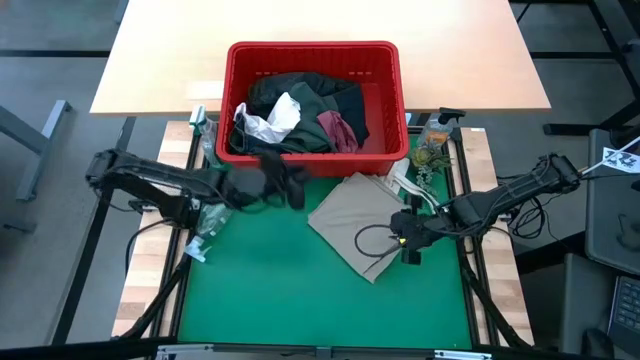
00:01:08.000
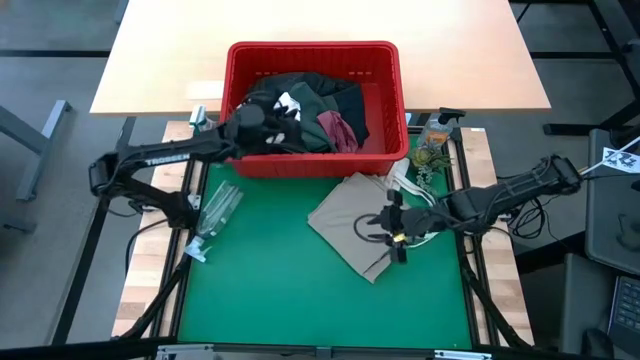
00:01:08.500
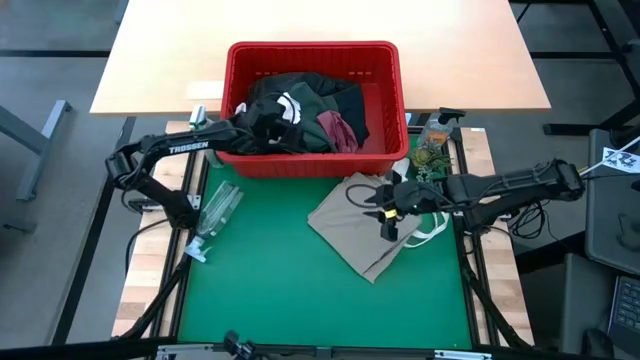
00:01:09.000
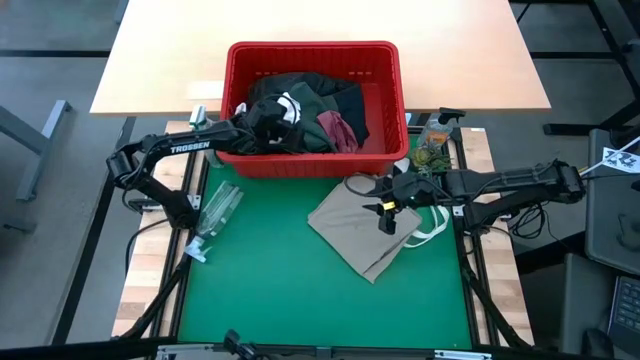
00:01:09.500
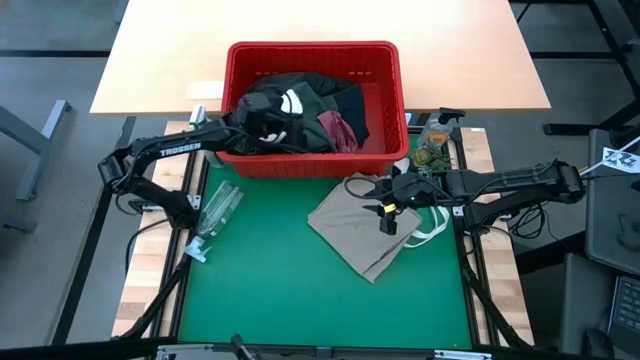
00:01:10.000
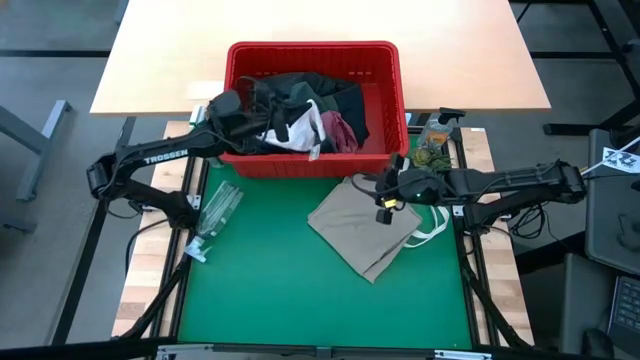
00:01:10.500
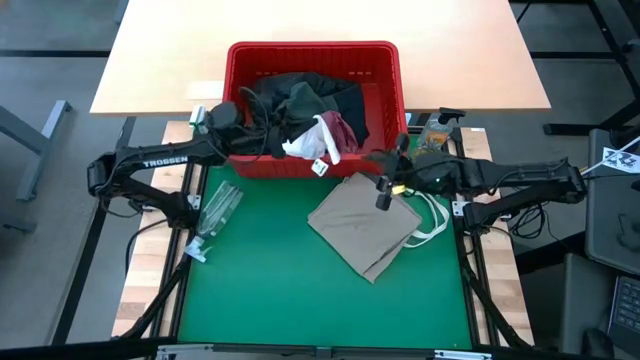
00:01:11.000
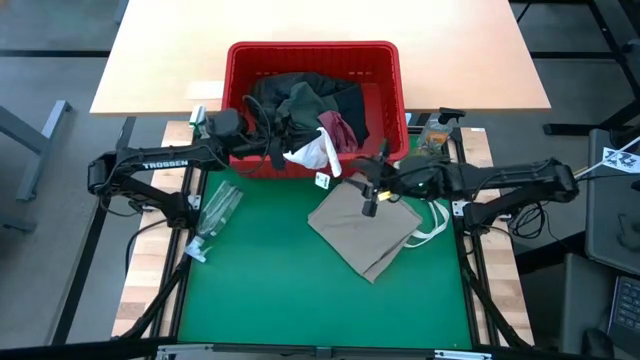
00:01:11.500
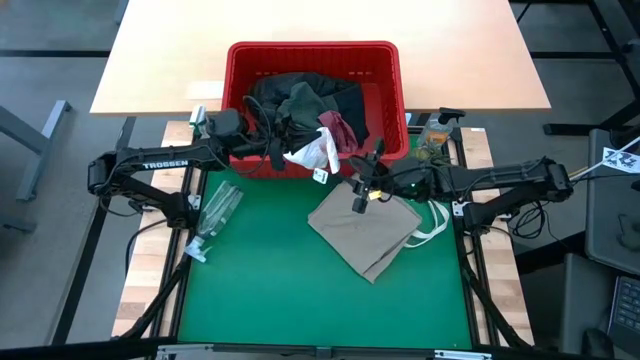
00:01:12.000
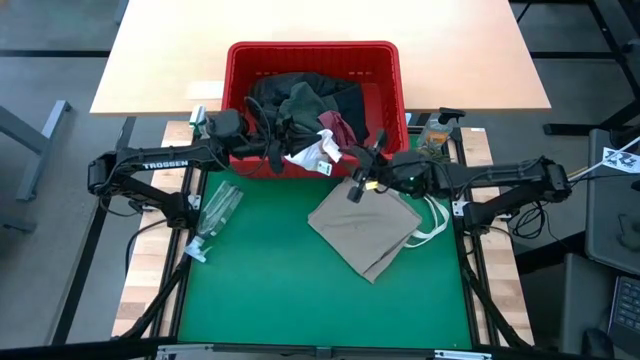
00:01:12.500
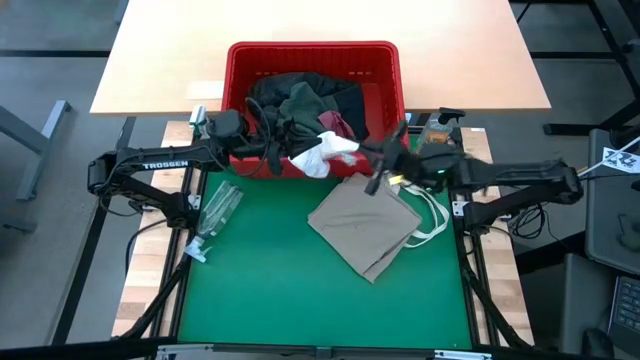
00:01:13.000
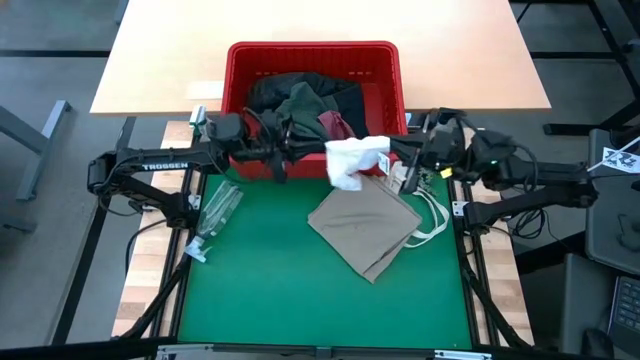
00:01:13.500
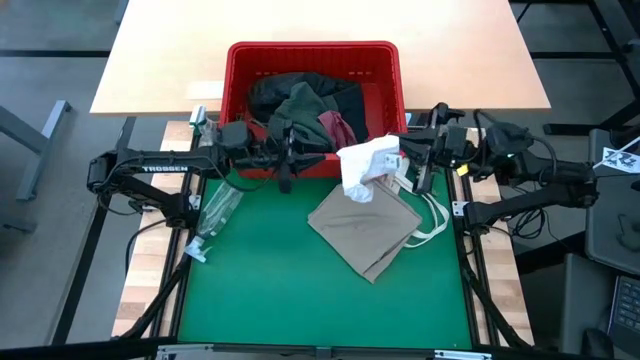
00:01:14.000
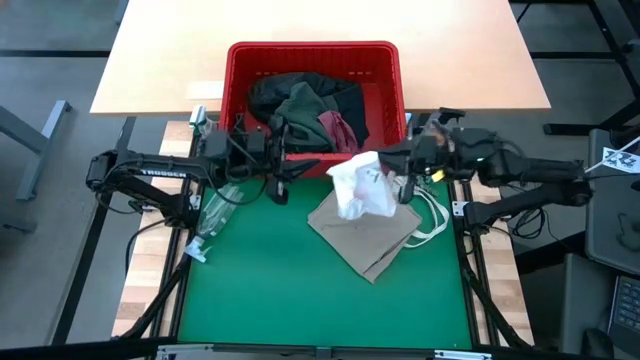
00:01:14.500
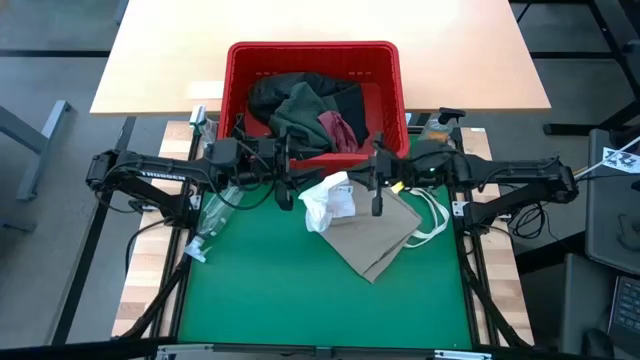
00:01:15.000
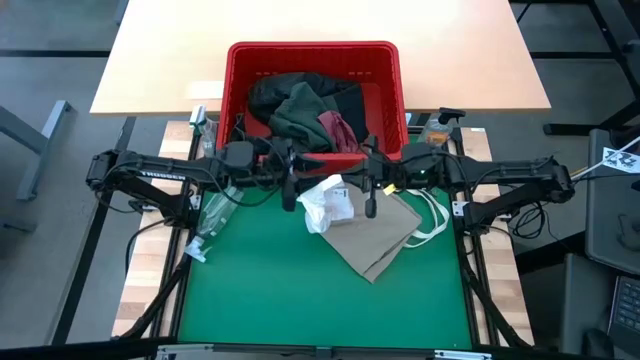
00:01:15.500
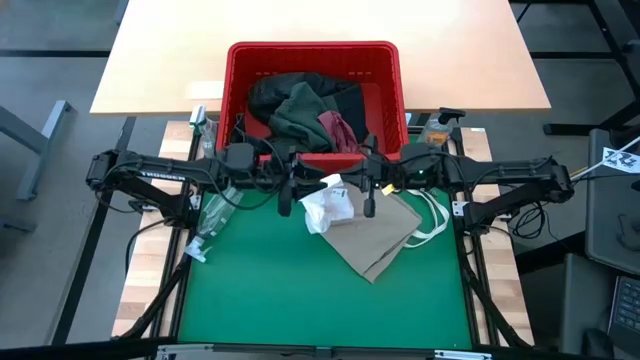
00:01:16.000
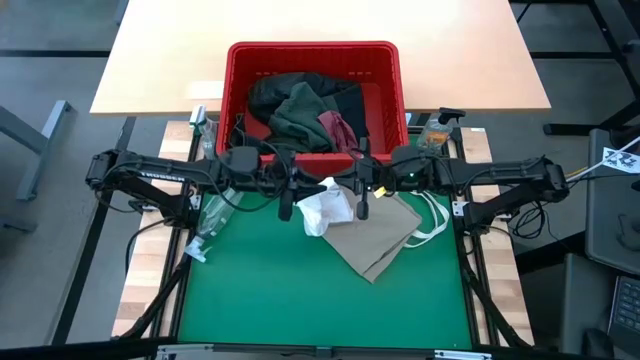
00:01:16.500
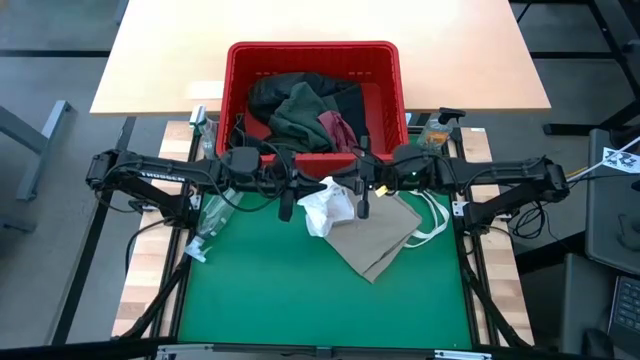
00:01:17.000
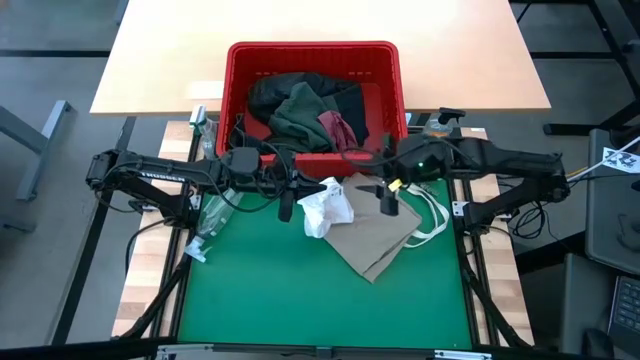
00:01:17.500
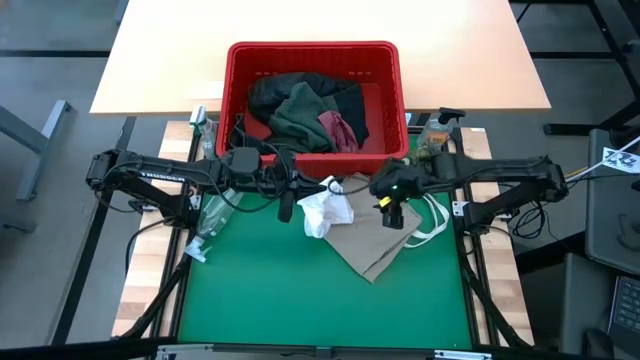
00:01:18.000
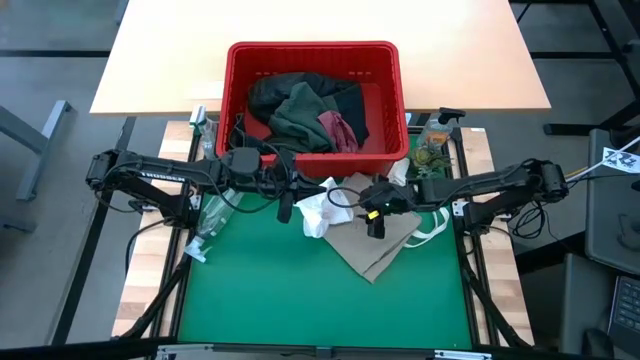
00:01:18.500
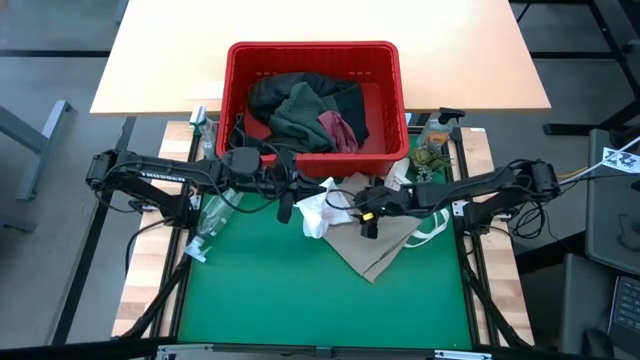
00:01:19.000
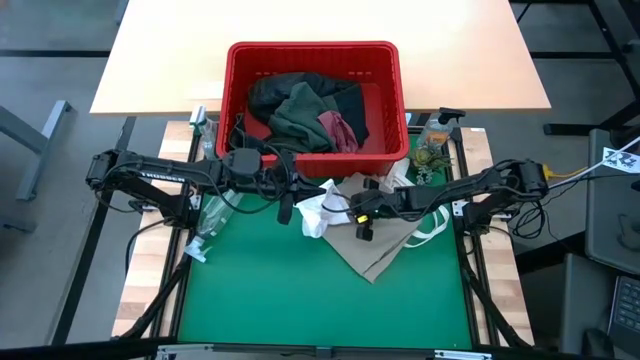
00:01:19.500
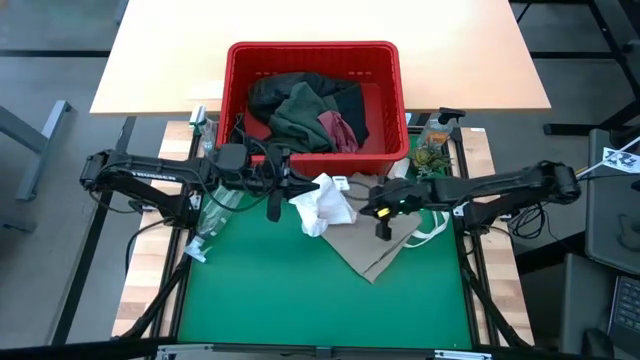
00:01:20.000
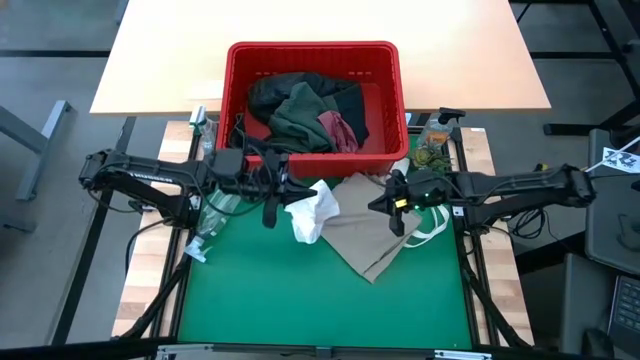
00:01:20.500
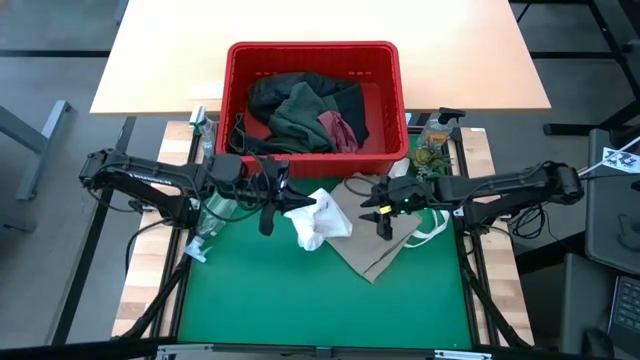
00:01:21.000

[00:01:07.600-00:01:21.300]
Task: Fold laundry
Fold the white underwear

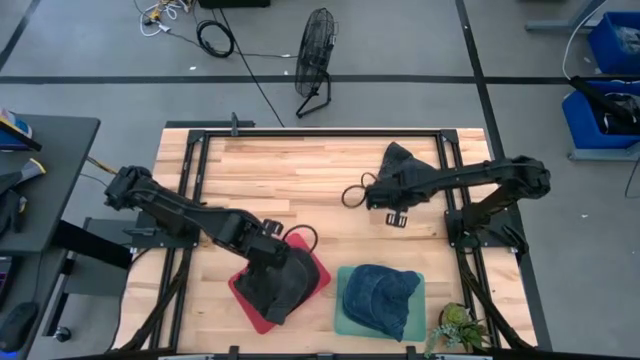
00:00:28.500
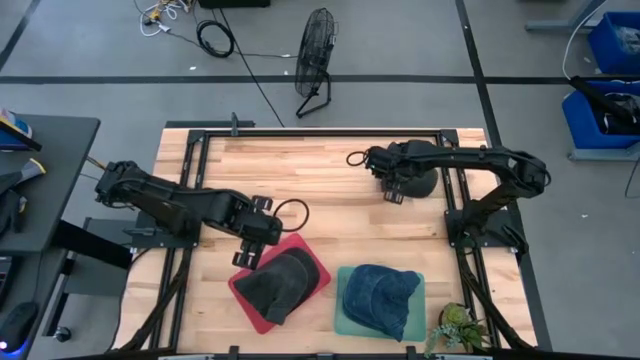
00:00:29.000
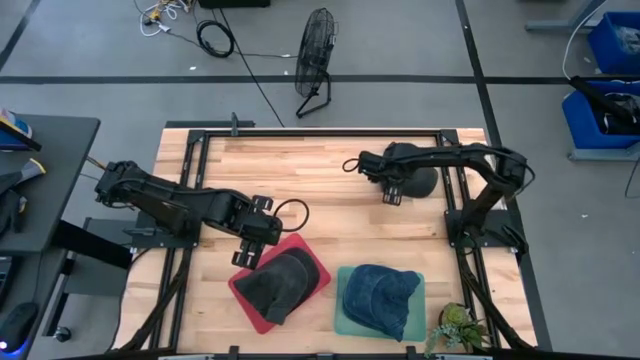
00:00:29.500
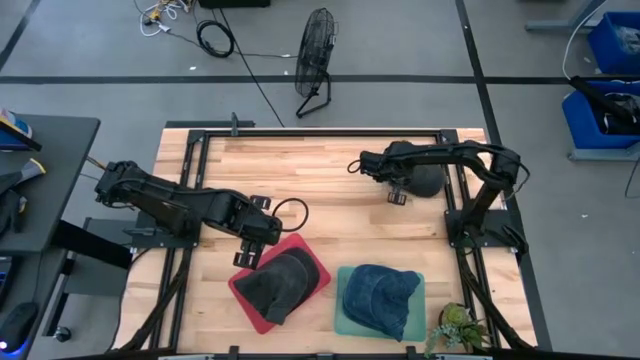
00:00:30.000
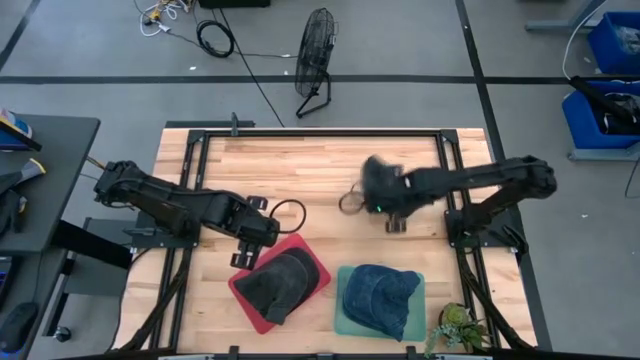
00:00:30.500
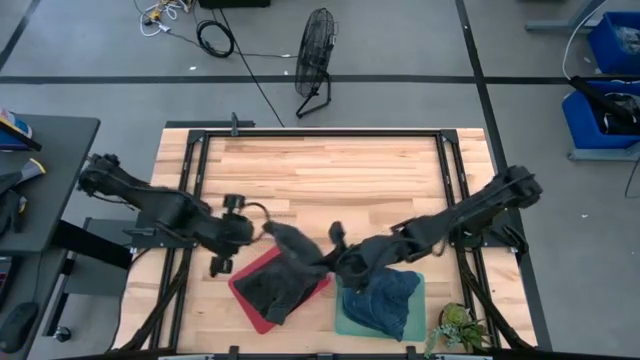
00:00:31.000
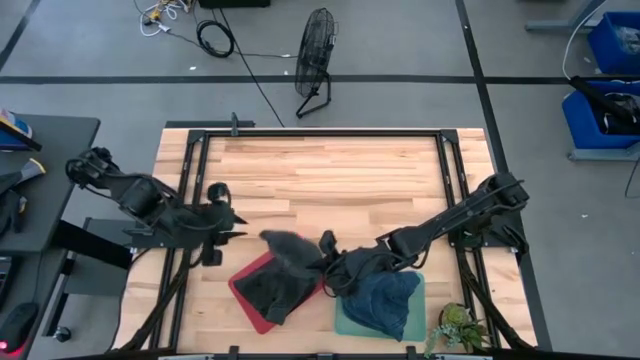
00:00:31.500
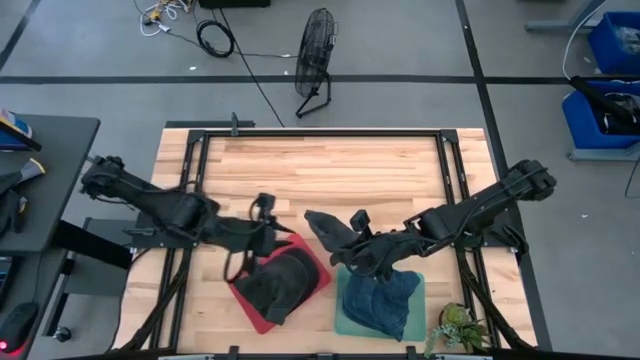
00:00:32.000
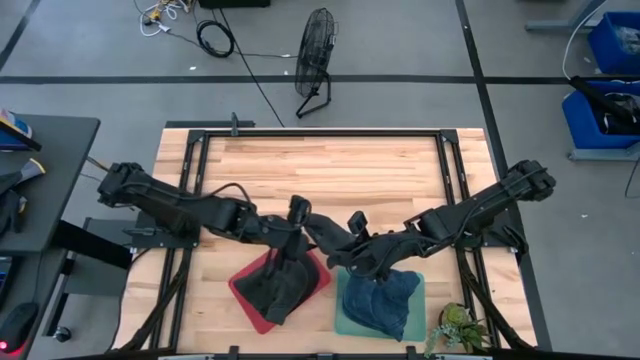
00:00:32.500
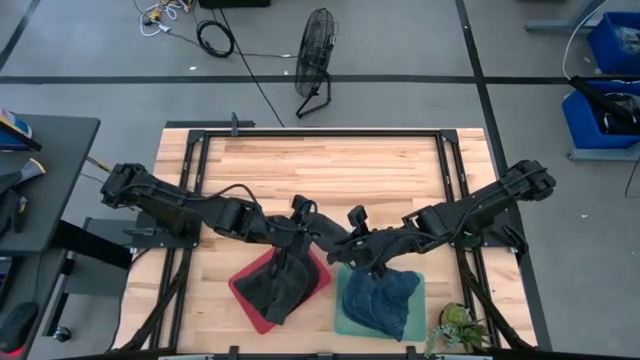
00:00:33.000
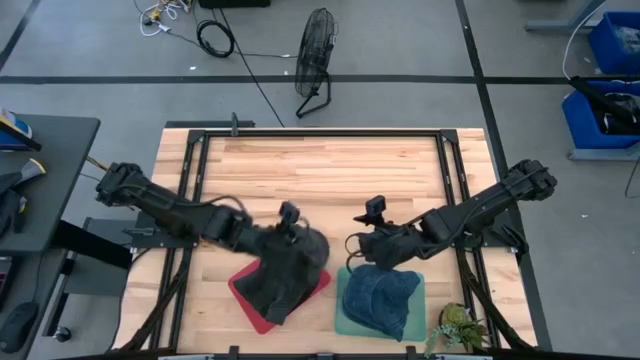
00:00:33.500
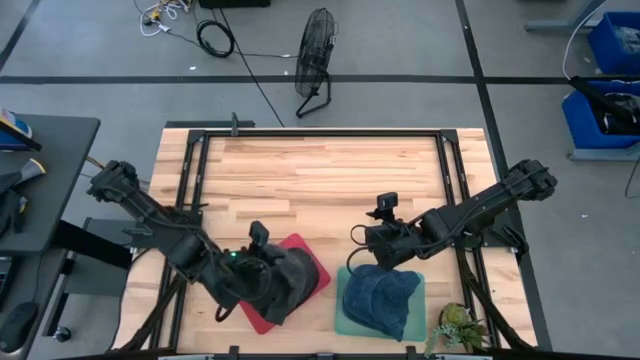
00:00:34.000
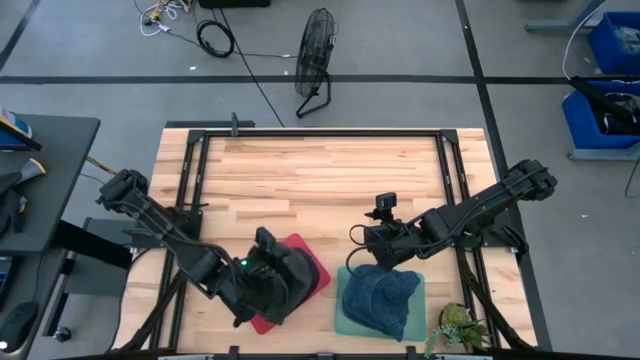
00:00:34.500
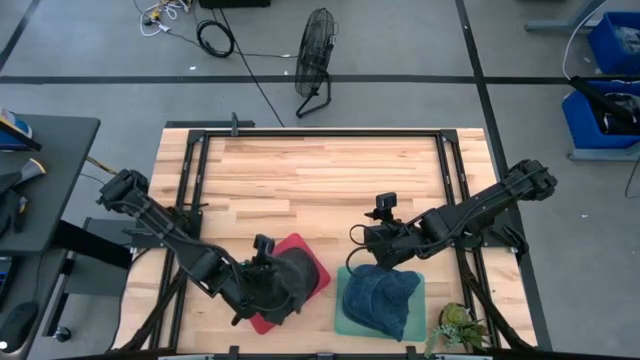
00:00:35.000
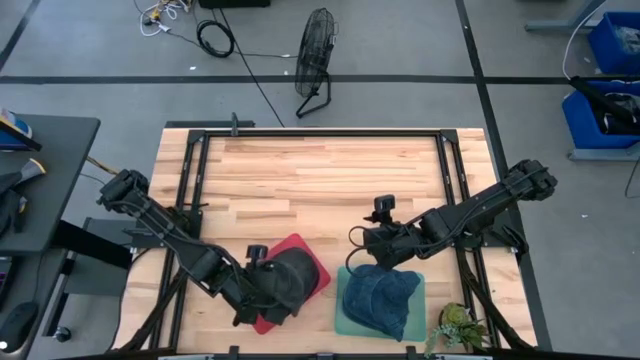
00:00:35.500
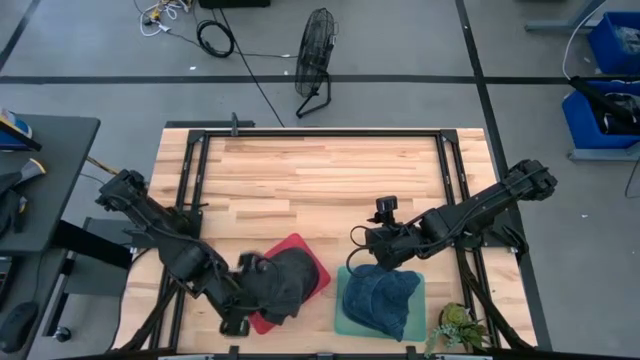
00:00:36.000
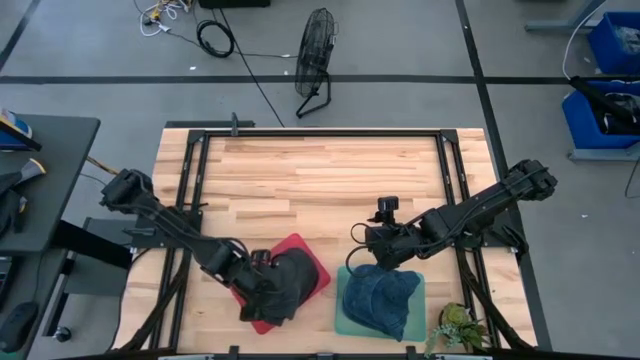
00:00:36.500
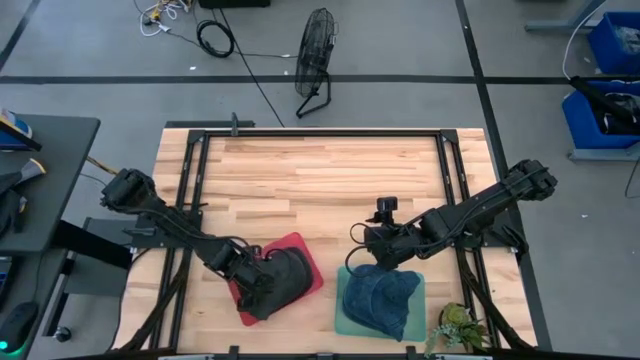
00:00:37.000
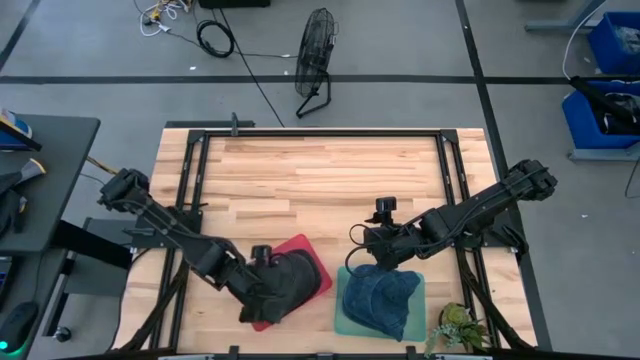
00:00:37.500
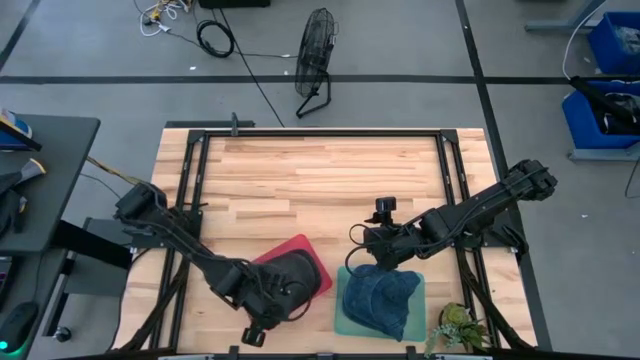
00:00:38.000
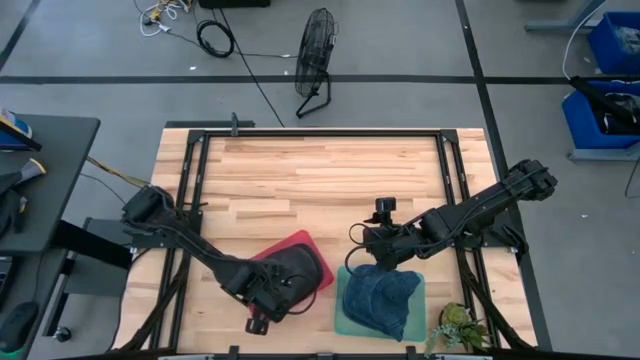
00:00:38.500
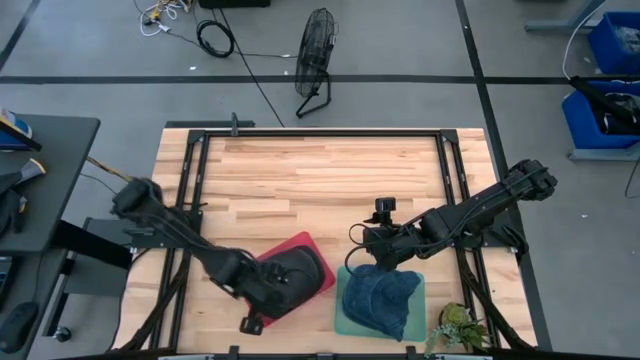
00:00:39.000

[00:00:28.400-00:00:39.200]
Task: Pick & Place hat
Put the black cap into the red bin
